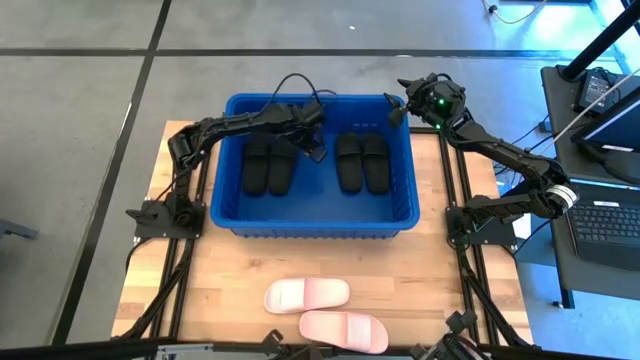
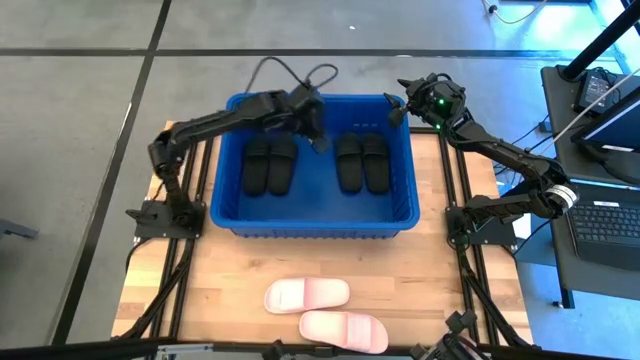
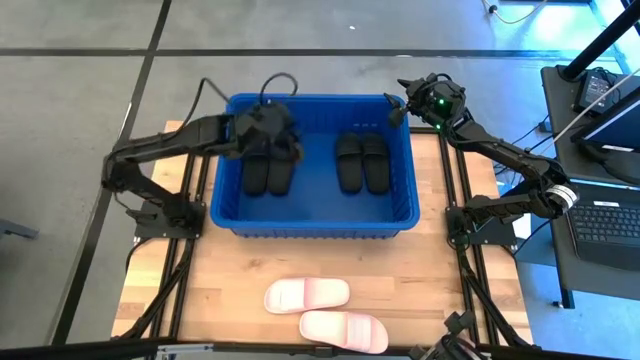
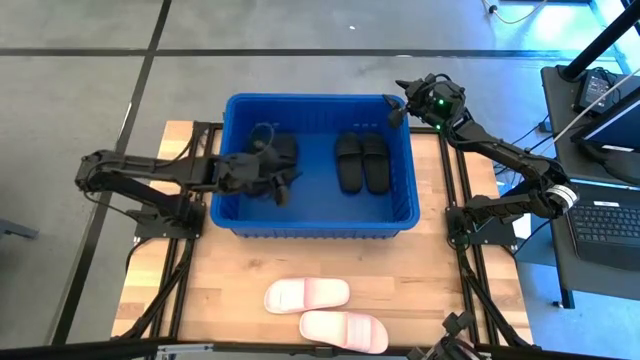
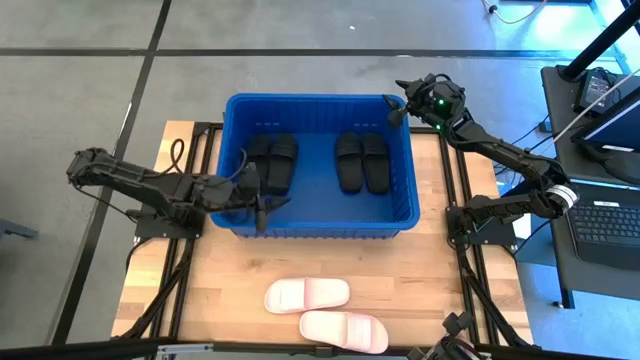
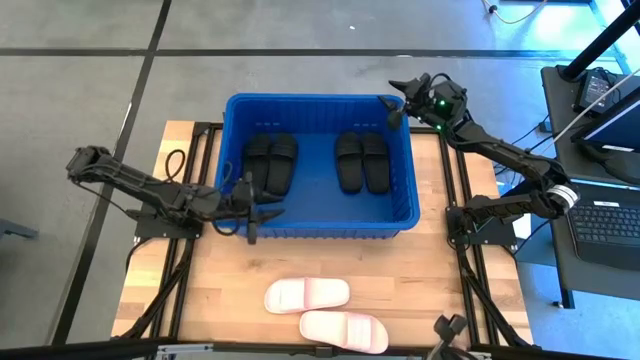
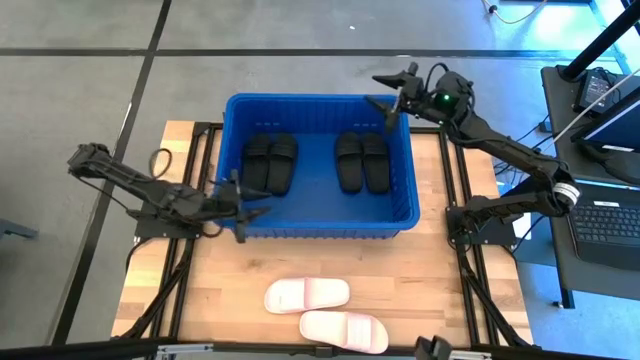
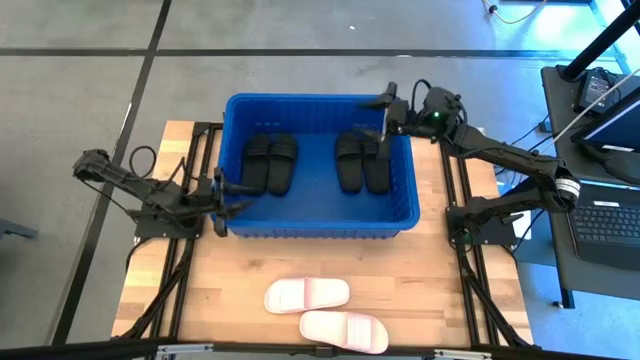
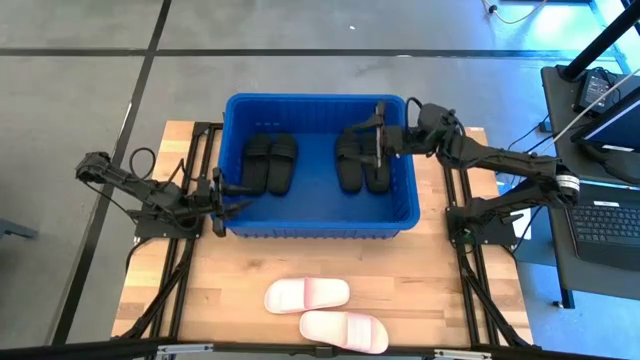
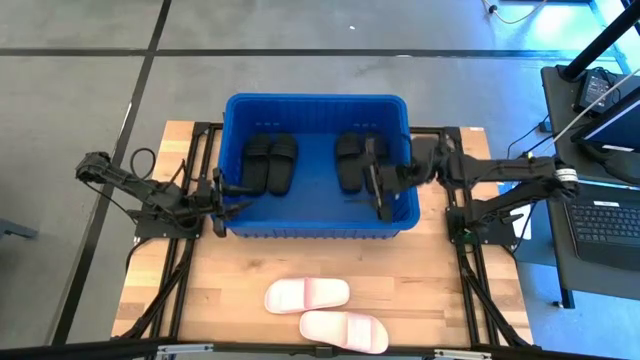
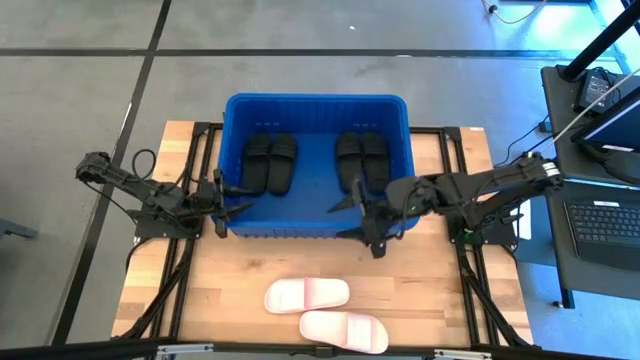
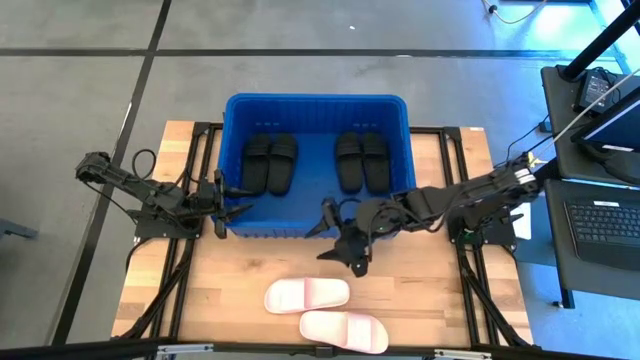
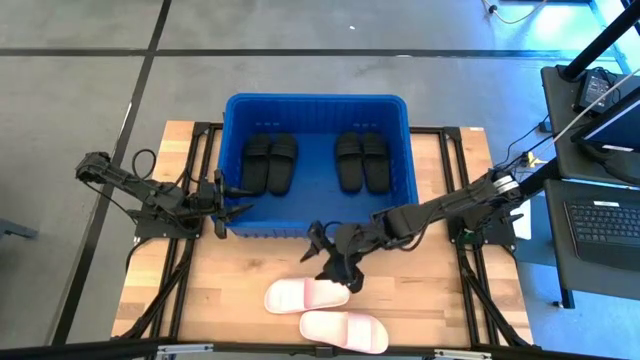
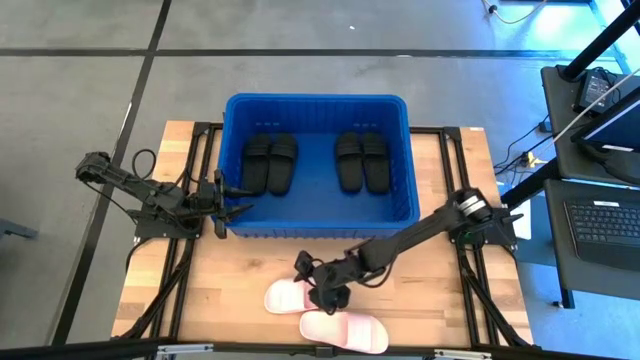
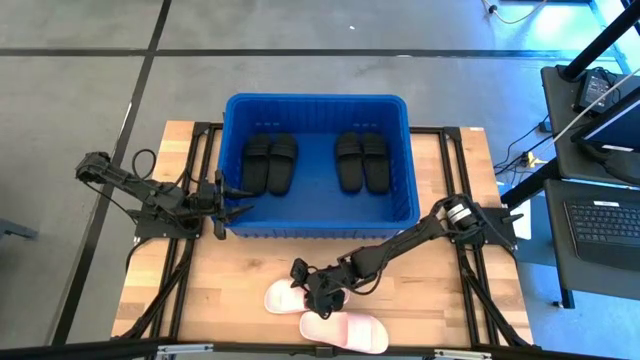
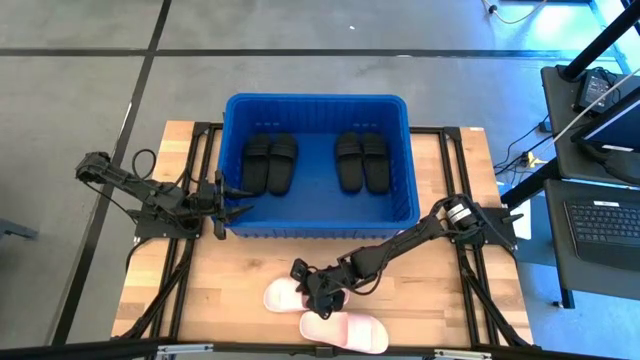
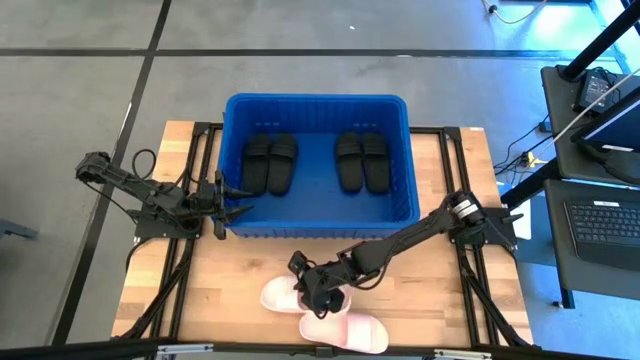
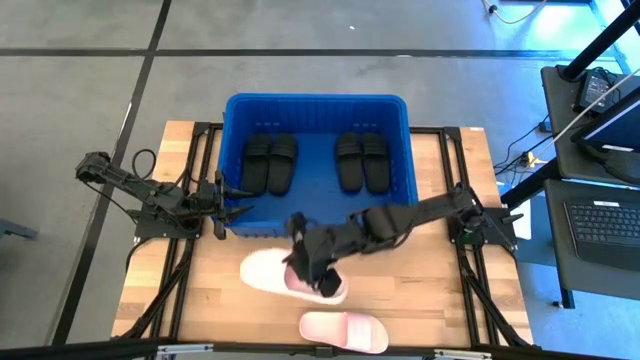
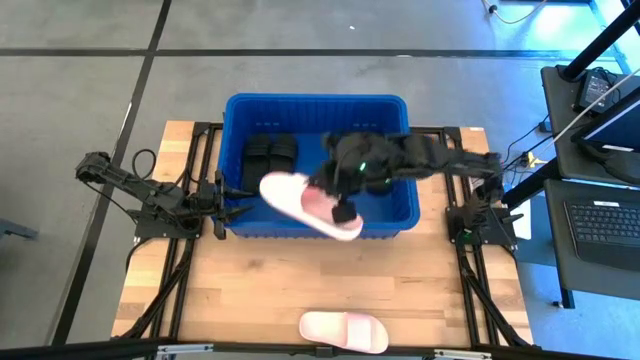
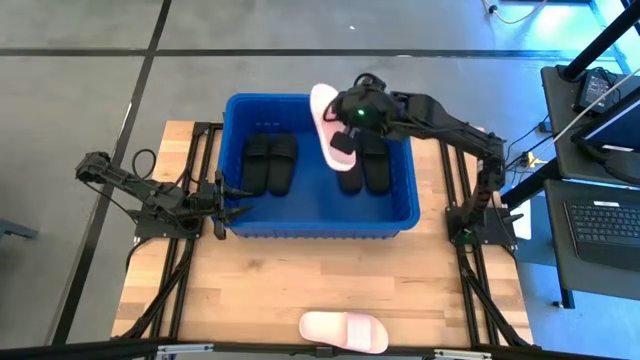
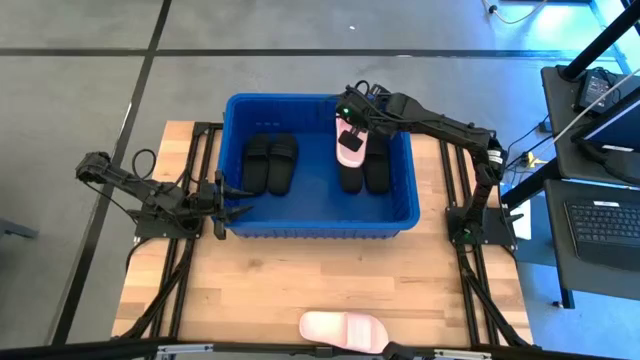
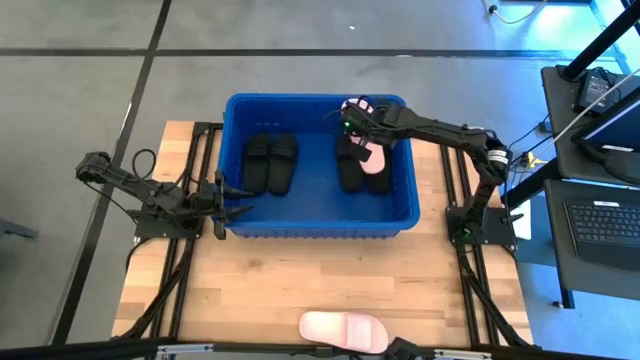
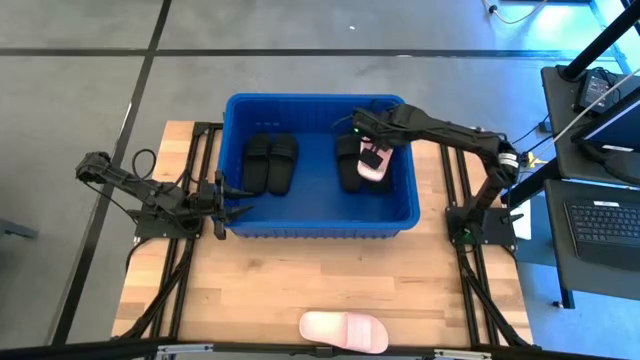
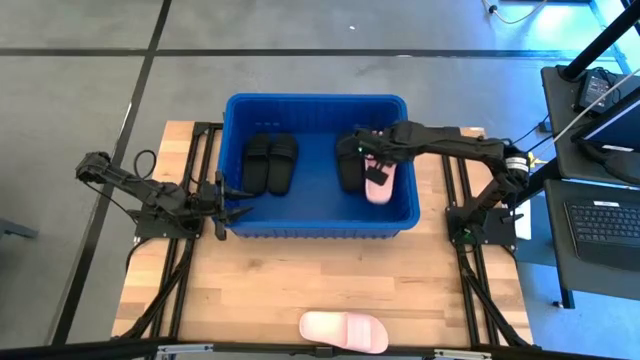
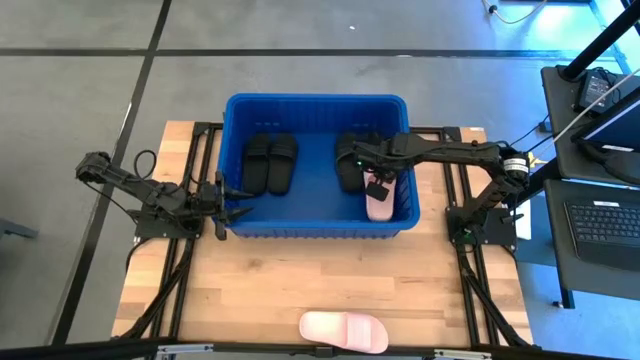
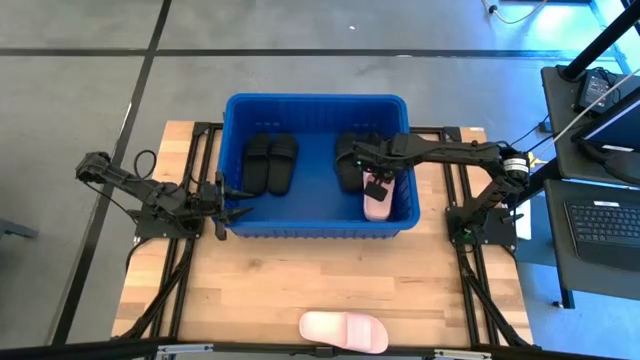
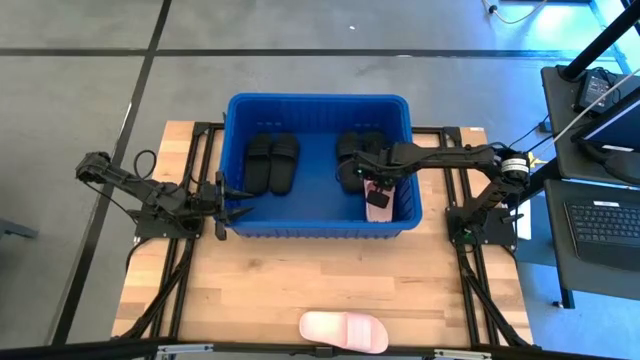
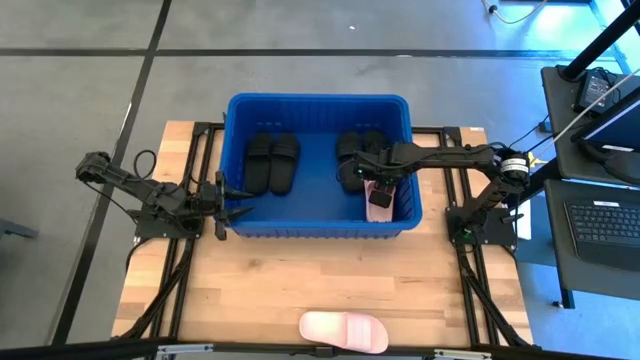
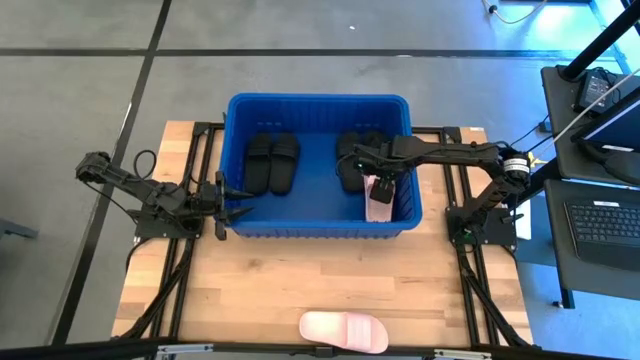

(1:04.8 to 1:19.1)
Task: Pick and place slides into bin
Put the pink slide into the blue container

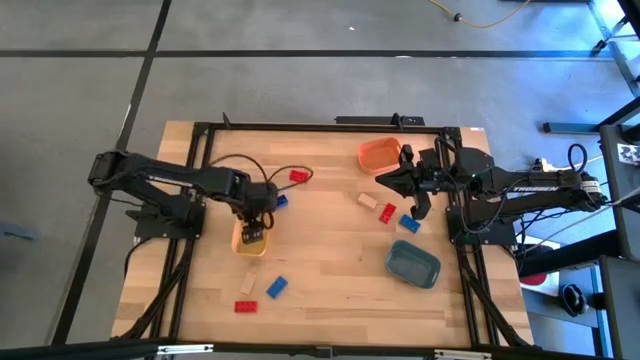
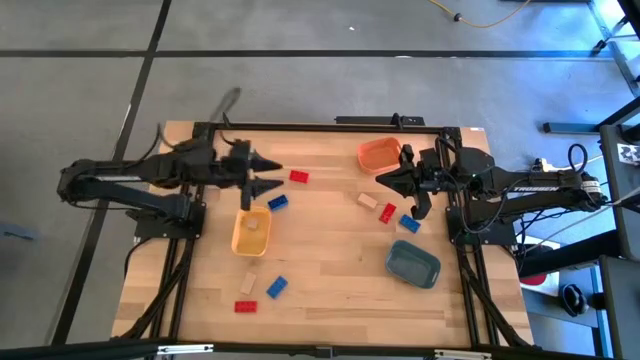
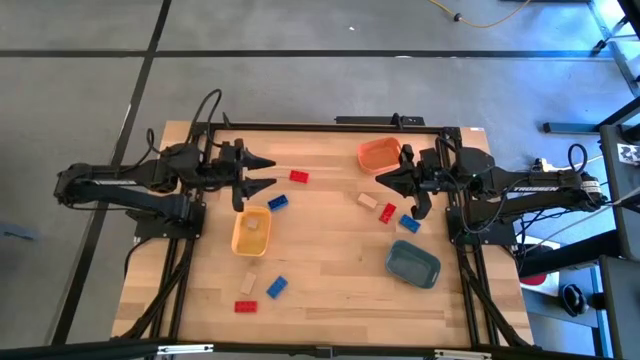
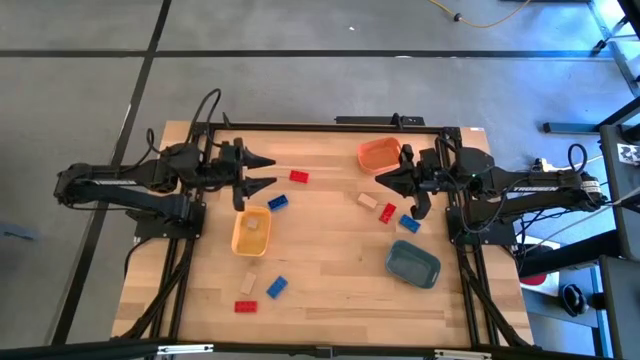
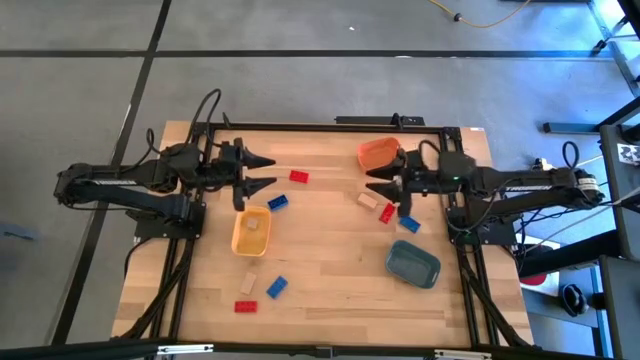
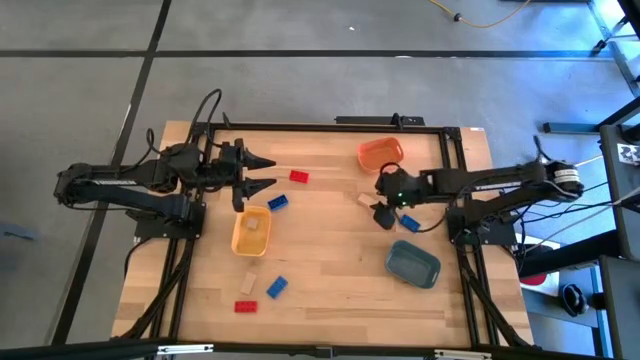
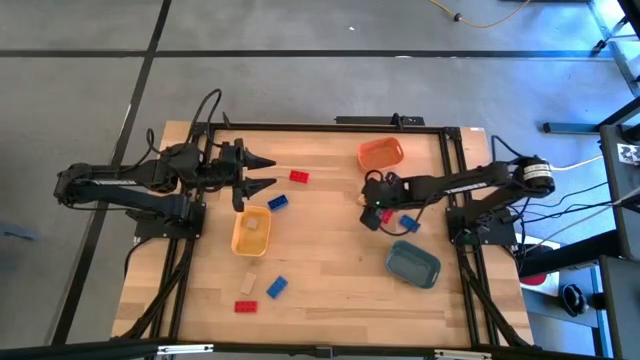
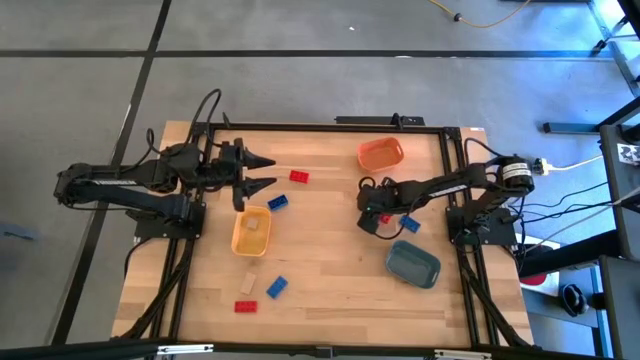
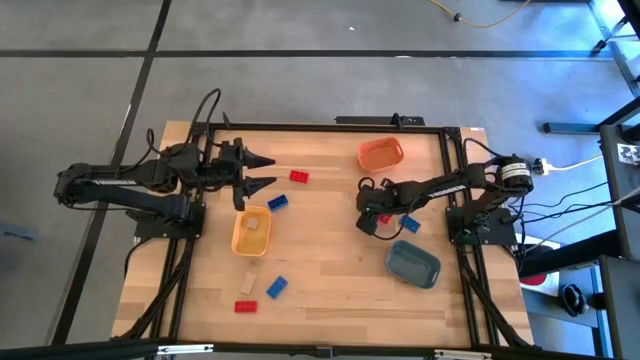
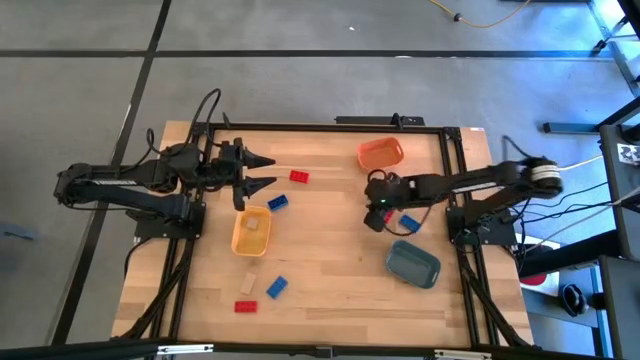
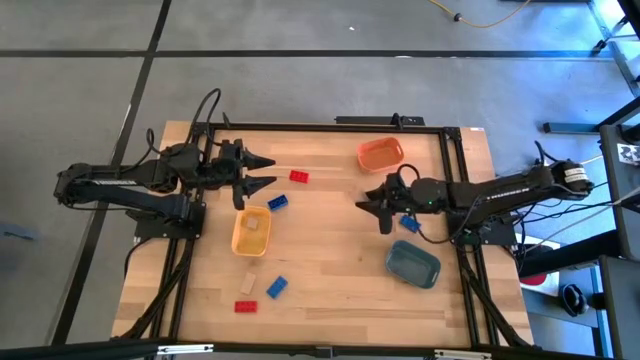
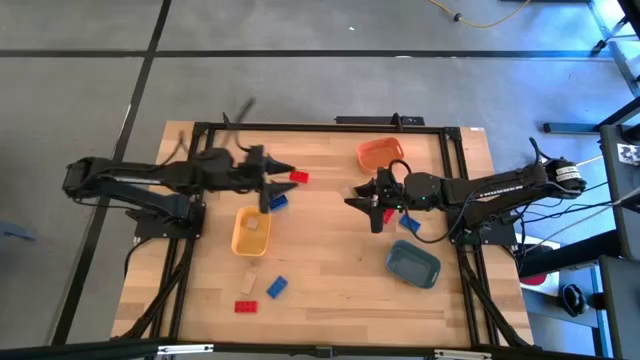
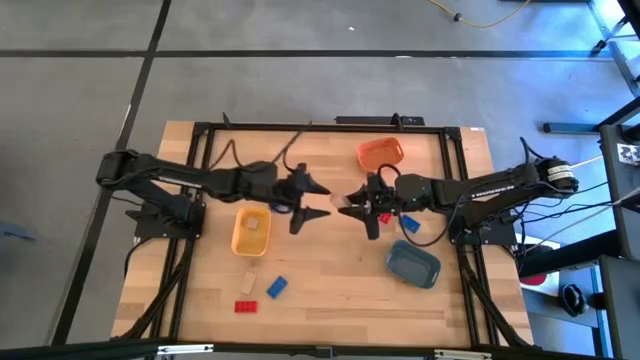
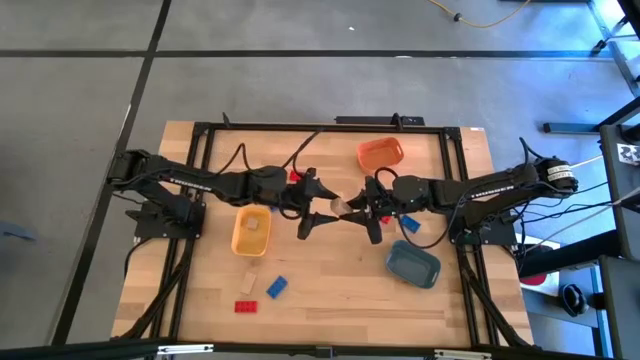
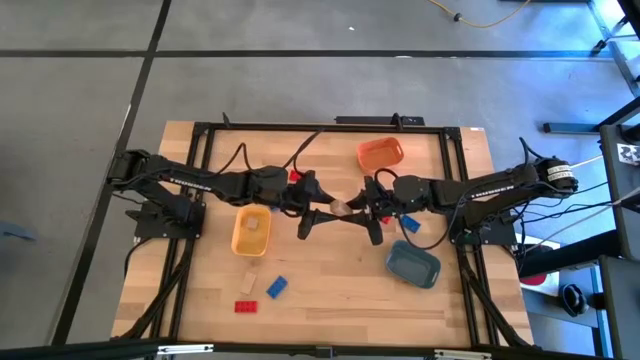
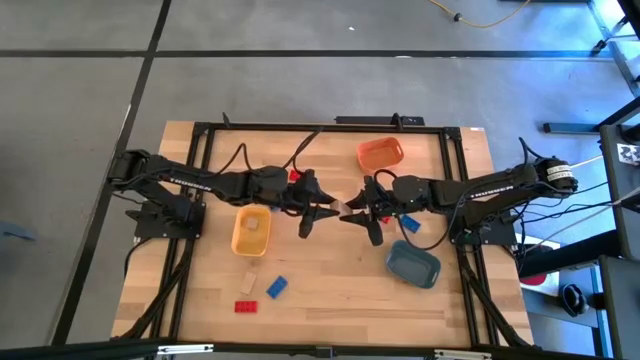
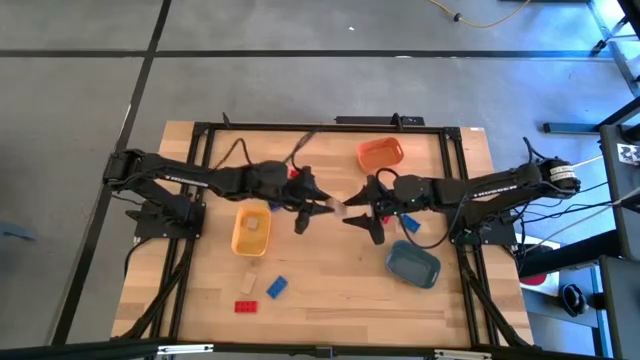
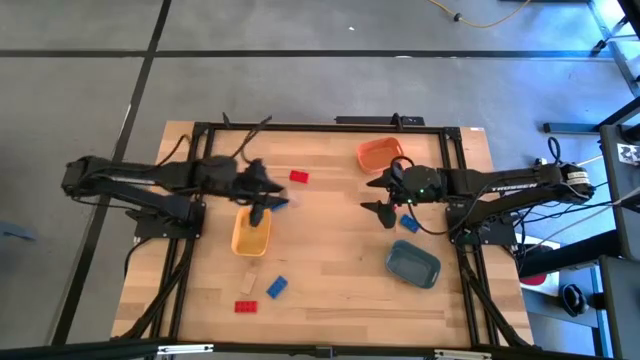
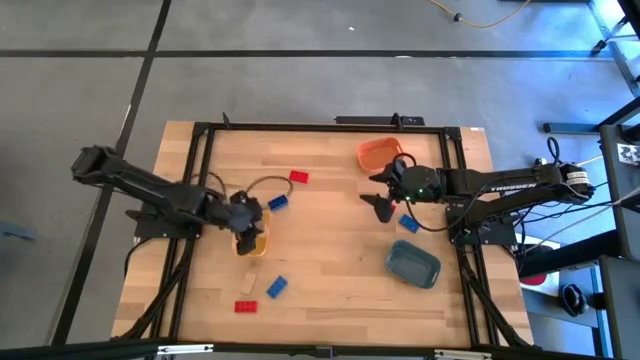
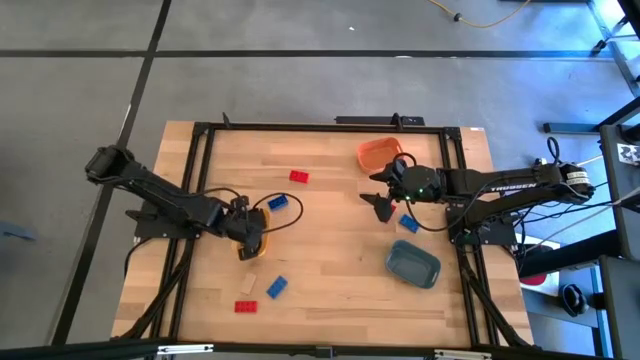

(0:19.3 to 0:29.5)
Task: Sort & place blocks by color
Put the top brown block into the yellow bin
